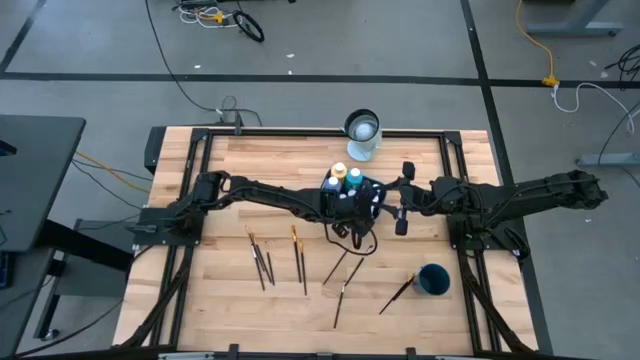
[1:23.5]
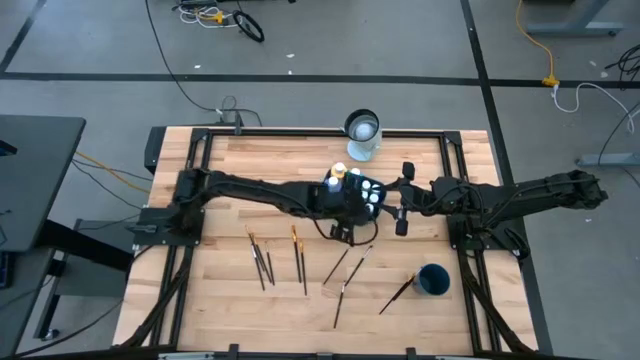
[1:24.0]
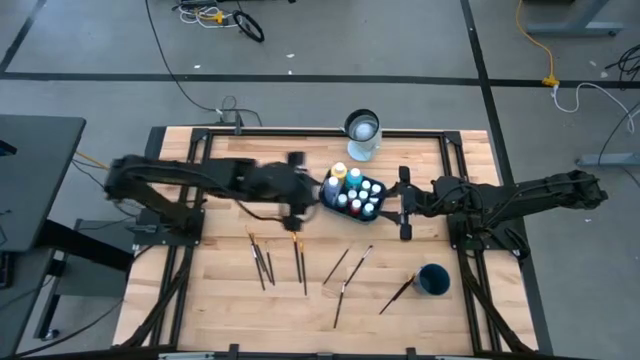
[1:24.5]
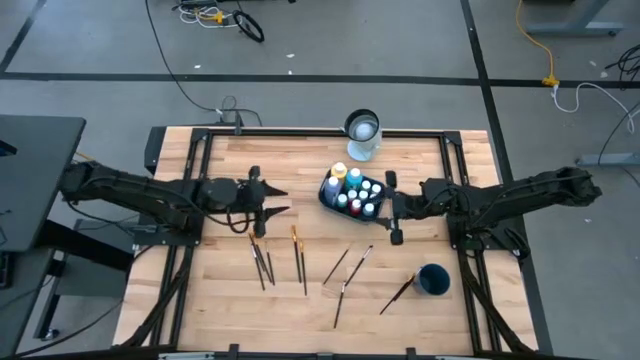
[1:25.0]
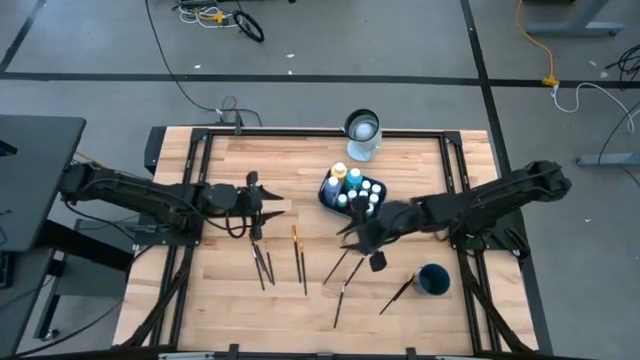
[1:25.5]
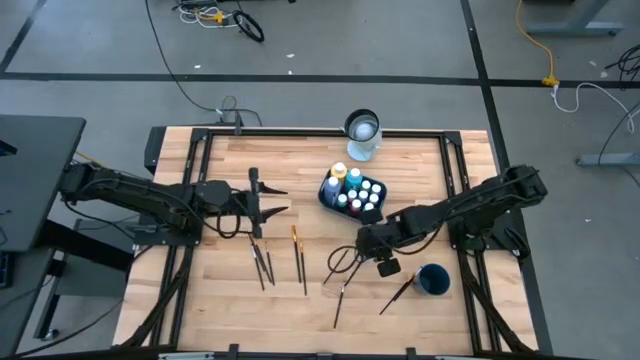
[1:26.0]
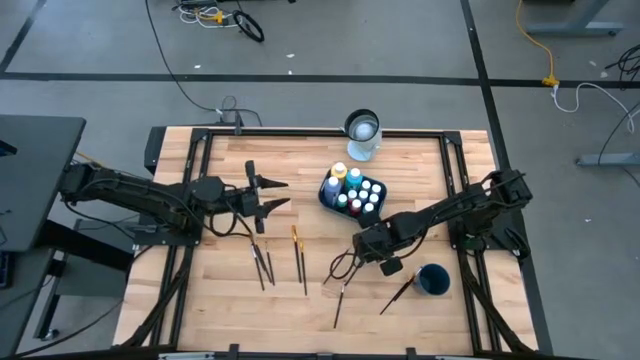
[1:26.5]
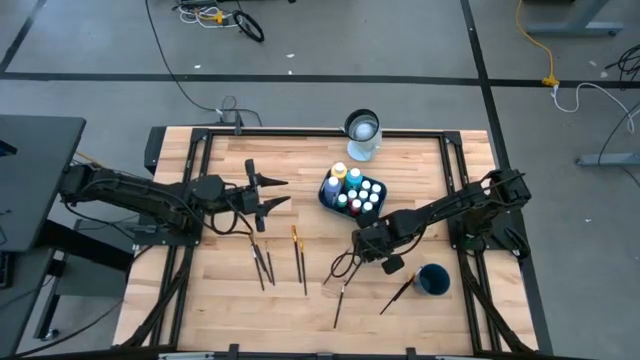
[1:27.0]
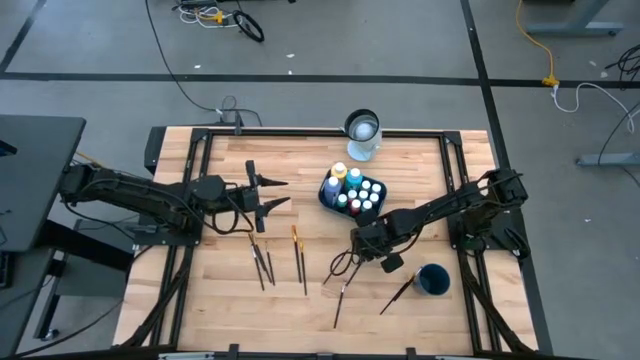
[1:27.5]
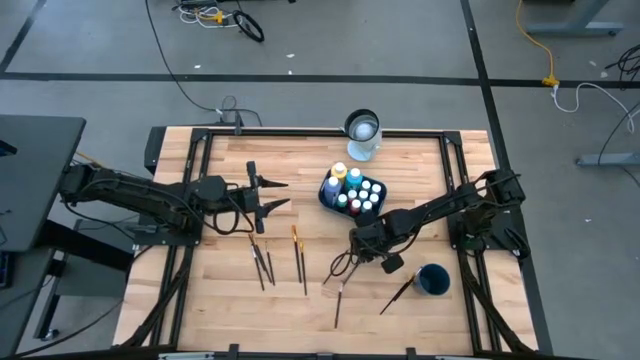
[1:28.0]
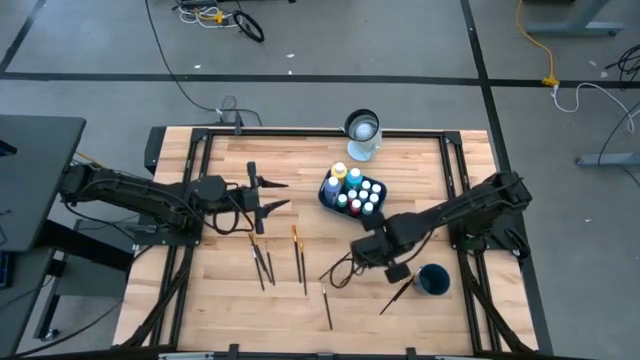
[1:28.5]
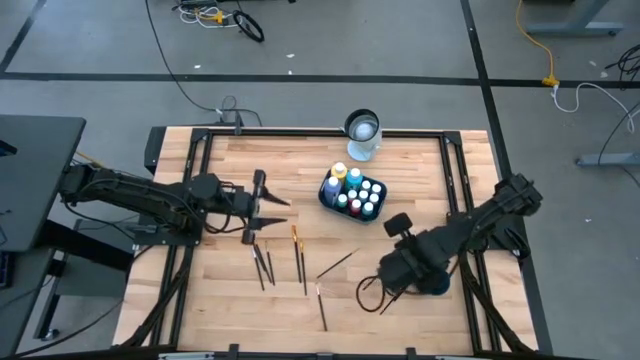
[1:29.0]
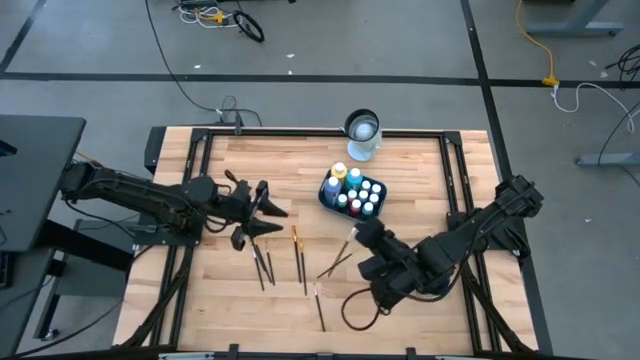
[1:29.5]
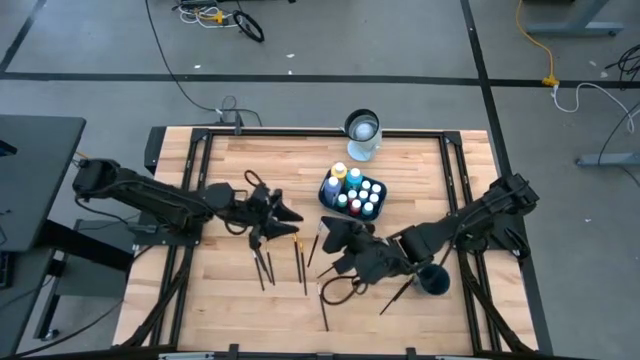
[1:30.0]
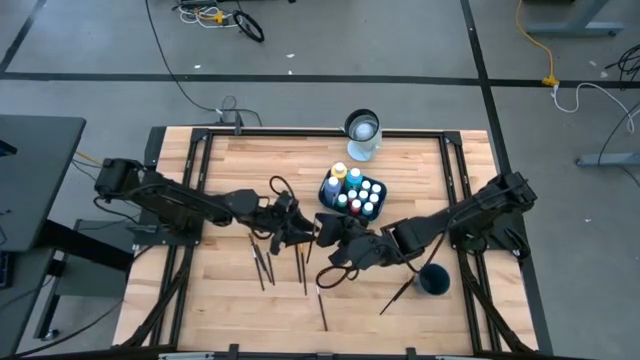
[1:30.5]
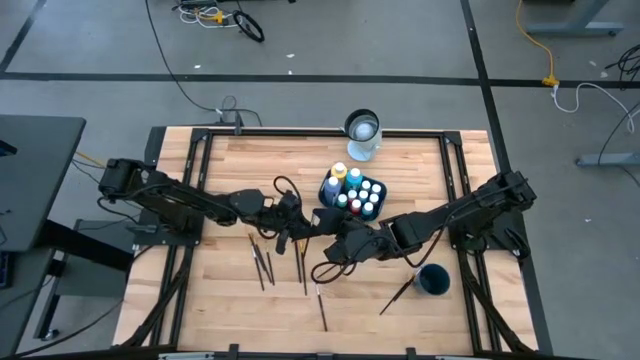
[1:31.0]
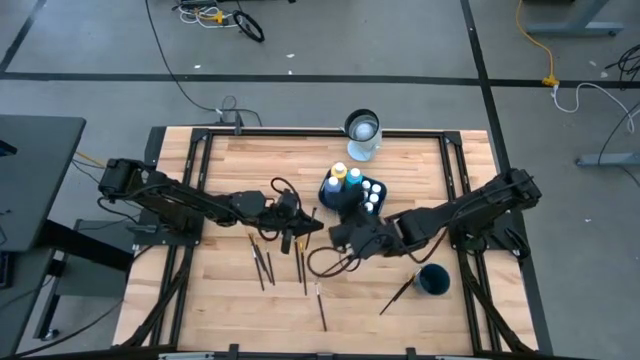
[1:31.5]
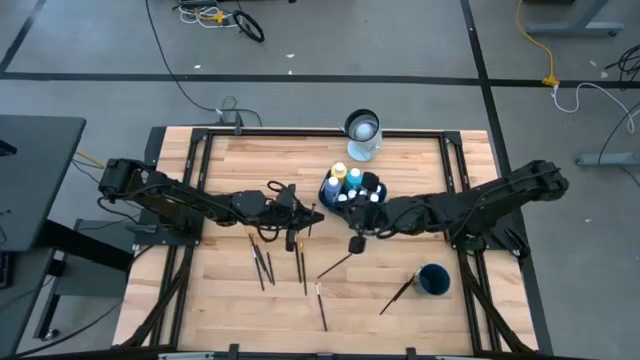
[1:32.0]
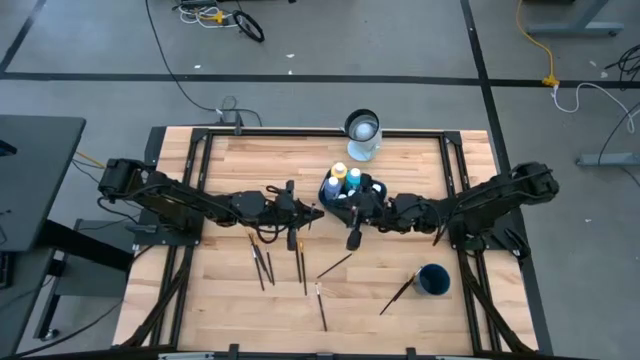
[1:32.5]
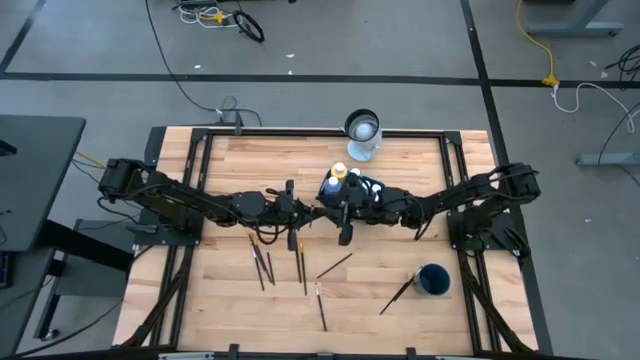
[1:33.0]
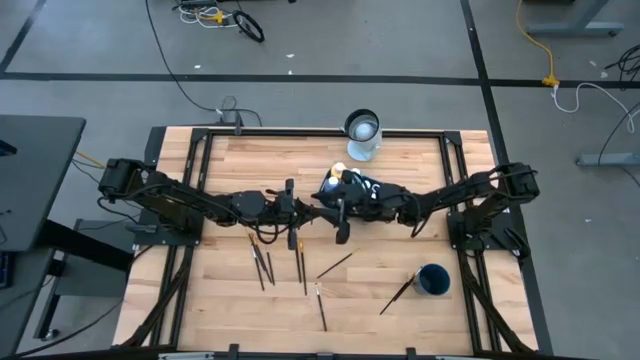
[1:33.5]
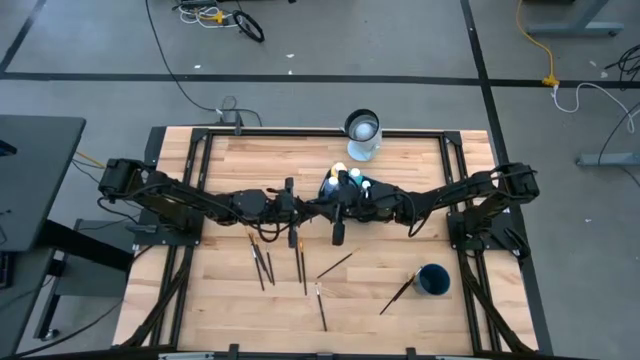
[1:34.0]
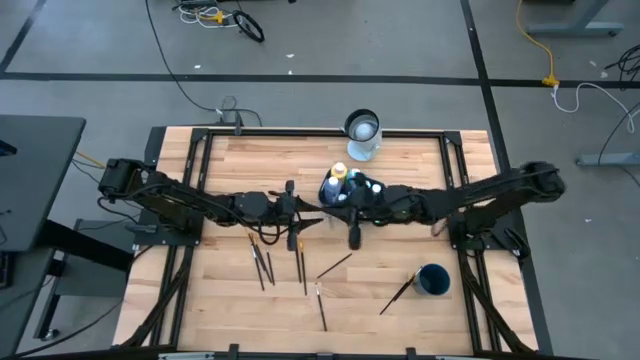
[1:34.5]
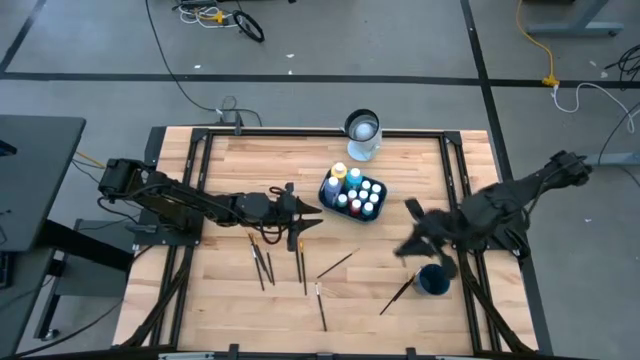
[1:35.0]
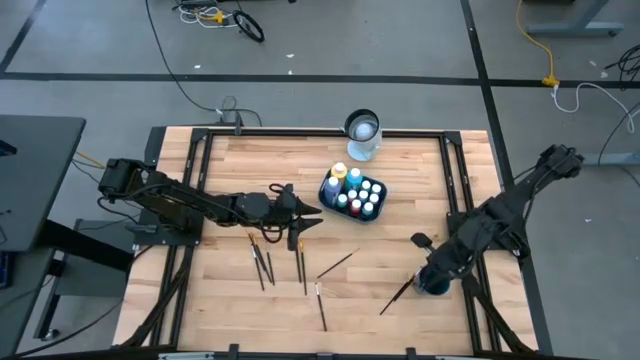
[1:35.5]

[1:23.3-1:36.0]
Task: Pick & Place Paint Supplies
Put the silver paint brush into the blue cup

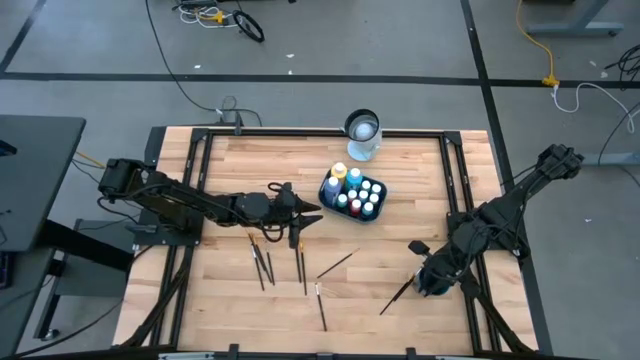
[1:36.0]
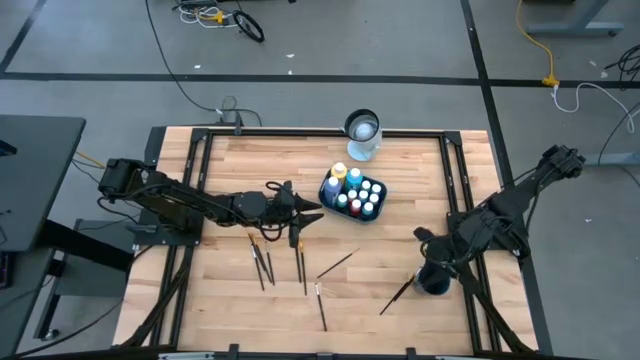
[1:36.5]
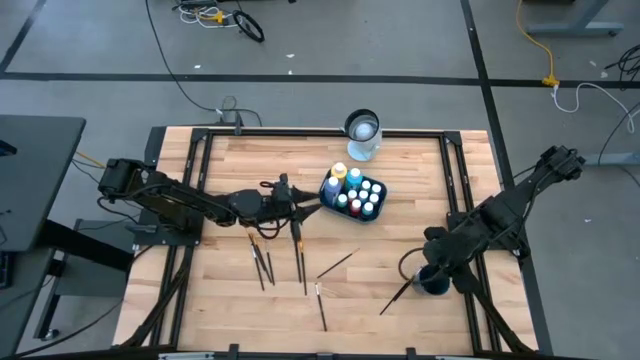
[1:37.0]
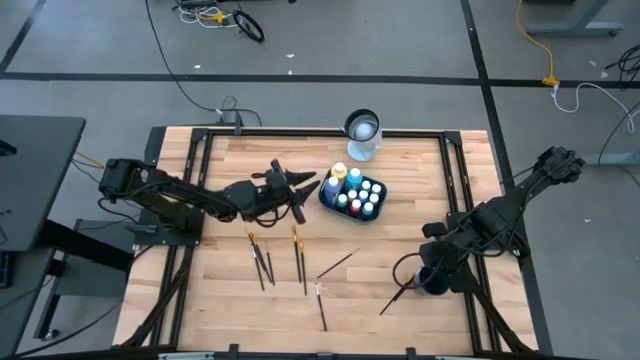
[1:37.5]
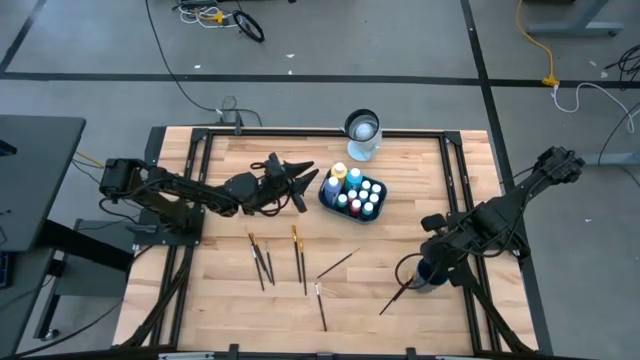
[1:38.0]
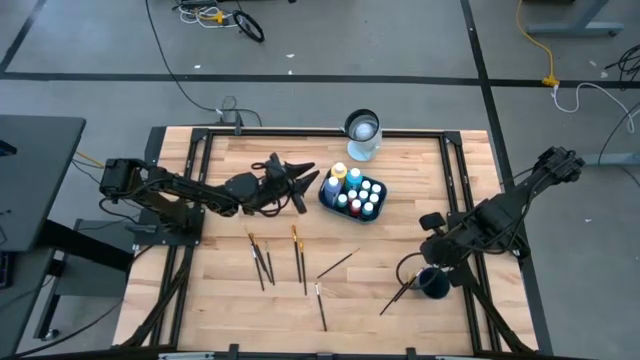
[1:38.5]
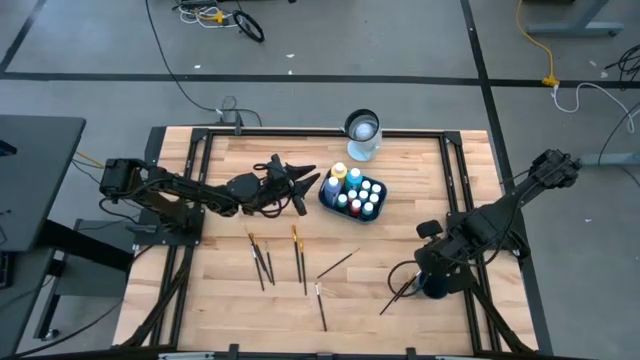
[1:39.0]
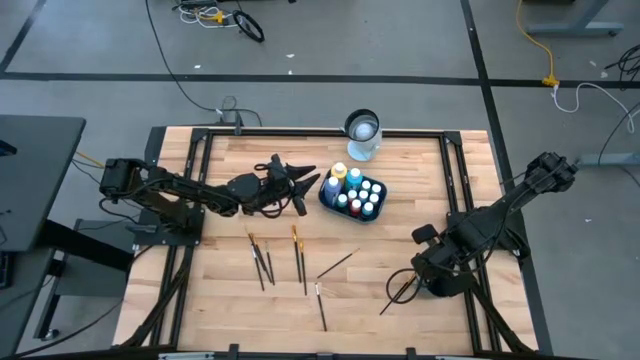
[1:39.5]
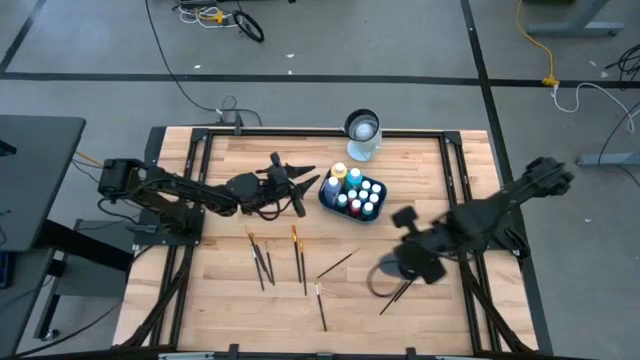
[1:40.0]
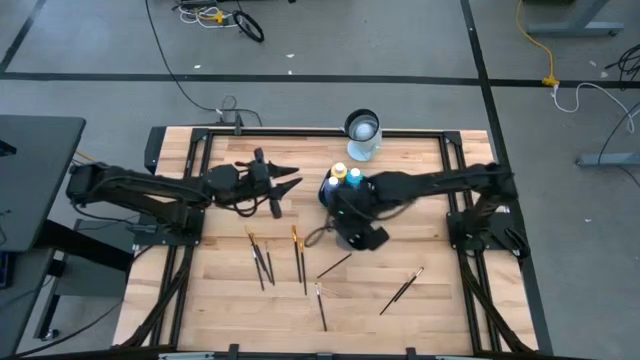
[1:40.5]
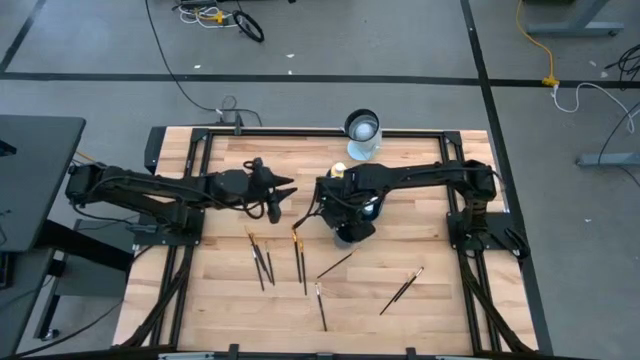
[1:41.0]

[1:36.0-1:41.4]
Move the blue cup into the center of the table

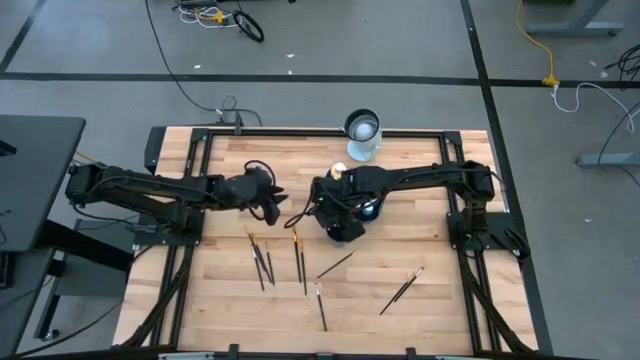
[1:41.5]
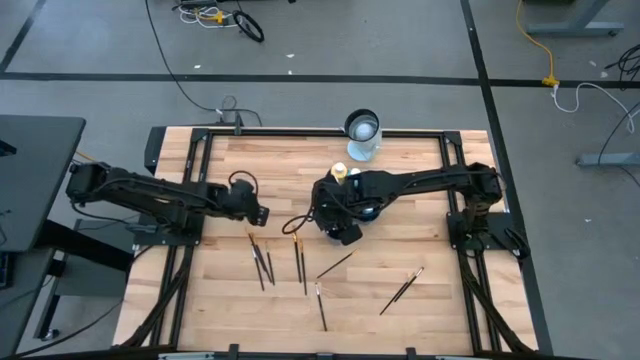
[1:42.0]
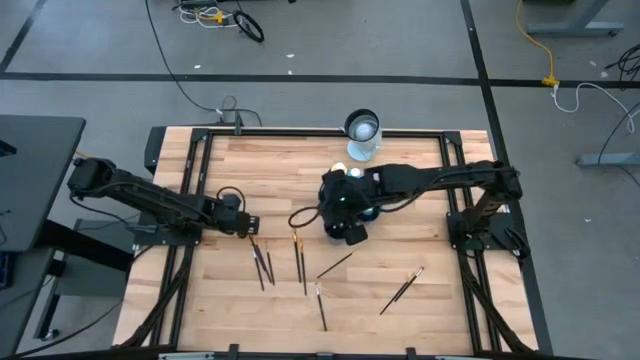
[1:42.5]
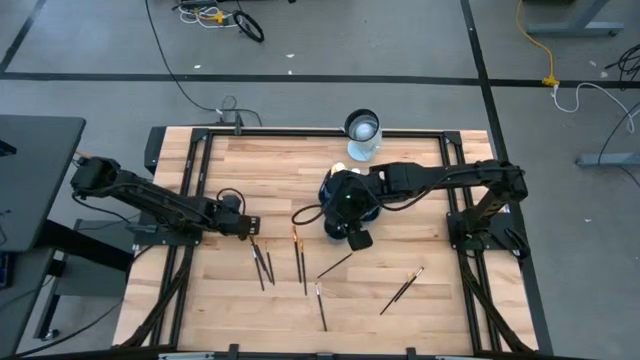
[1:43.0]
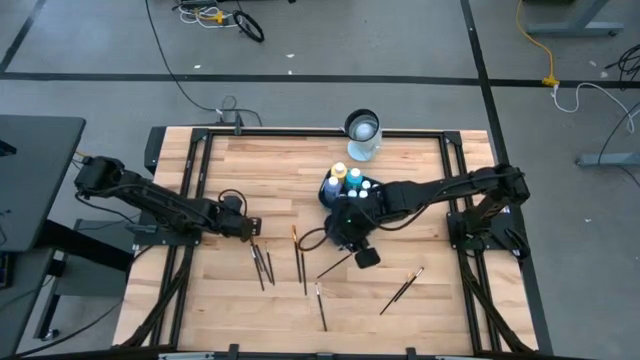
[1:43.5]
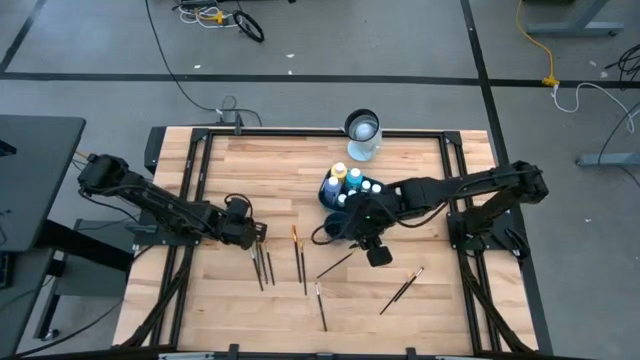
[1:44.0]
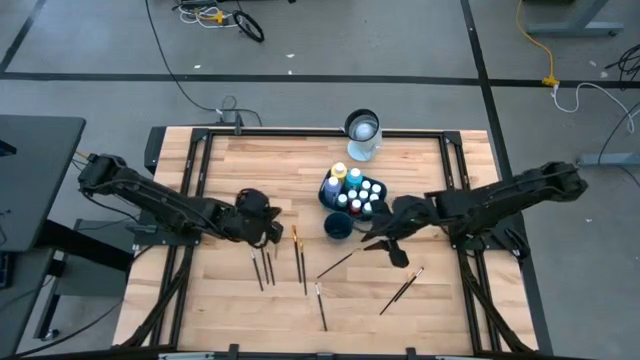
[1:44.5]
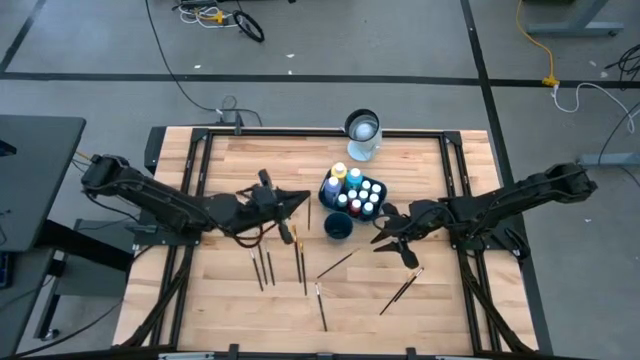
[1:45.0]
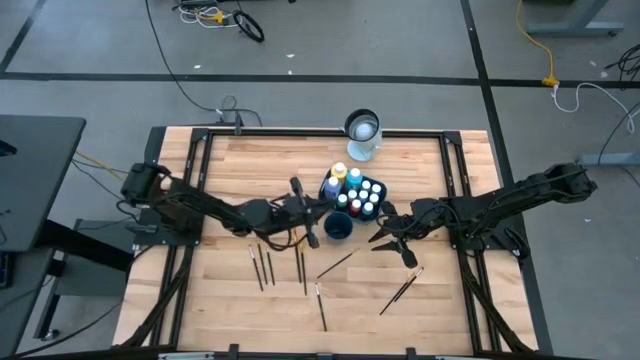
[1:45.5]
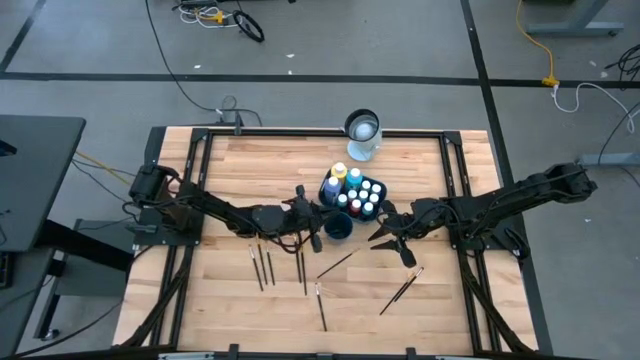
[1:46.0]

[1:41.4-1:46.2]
Put the gold paint brush into the blue cup
